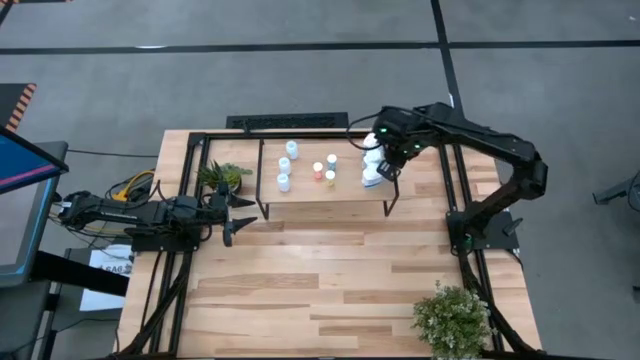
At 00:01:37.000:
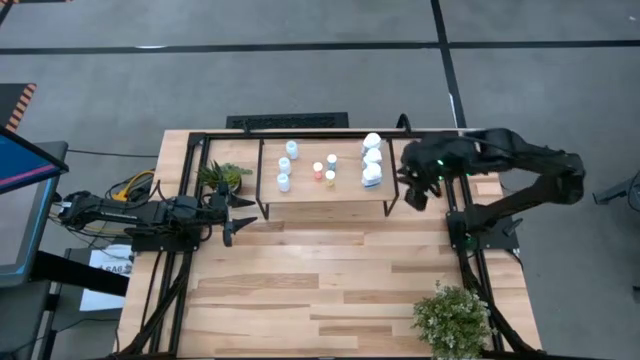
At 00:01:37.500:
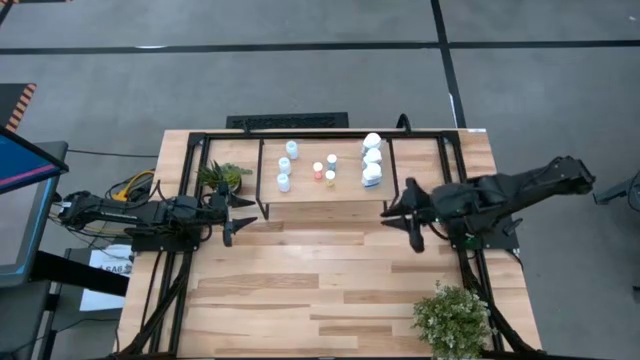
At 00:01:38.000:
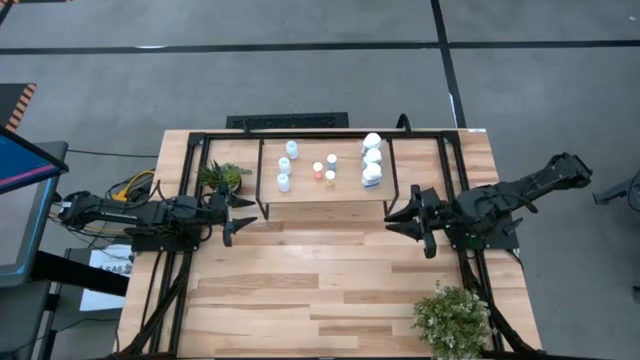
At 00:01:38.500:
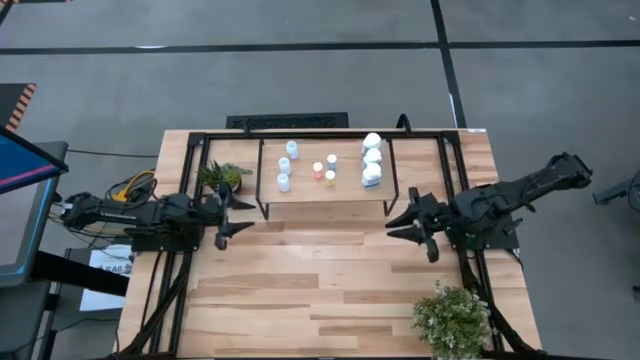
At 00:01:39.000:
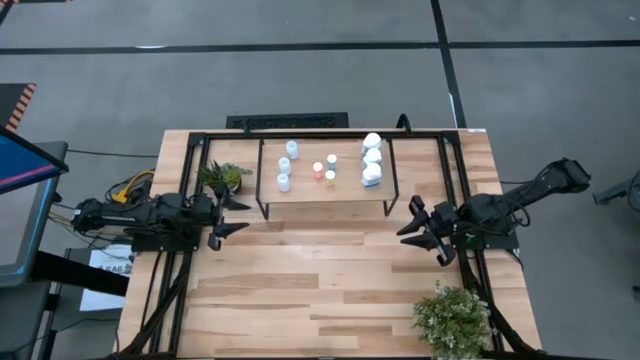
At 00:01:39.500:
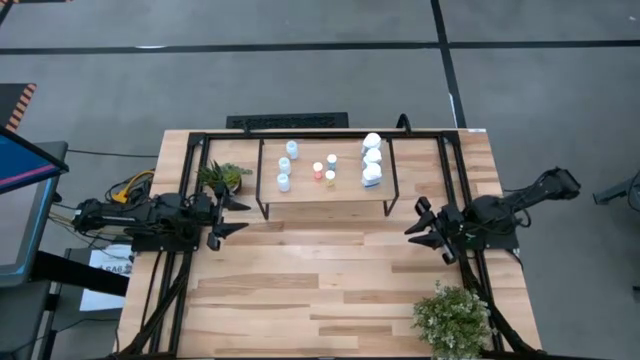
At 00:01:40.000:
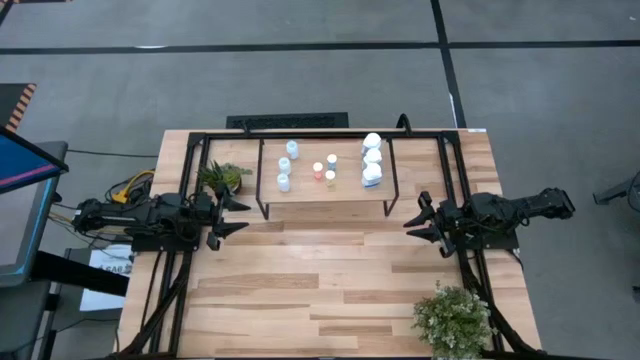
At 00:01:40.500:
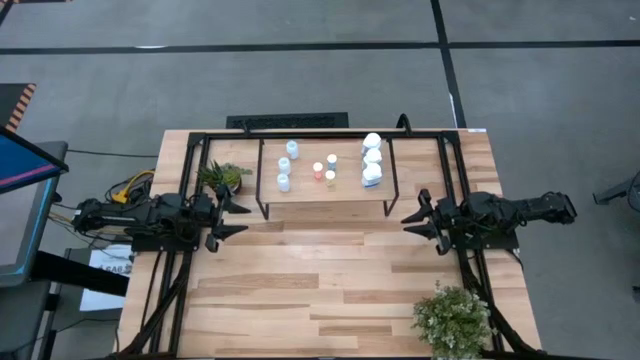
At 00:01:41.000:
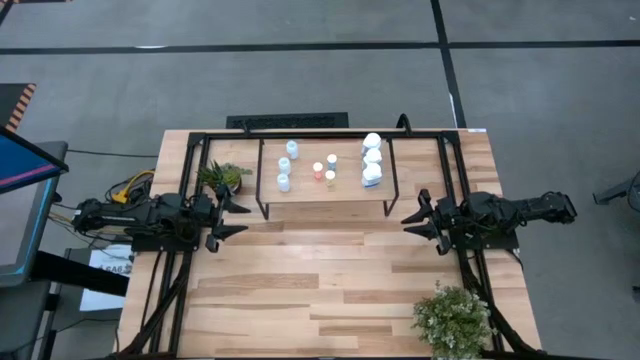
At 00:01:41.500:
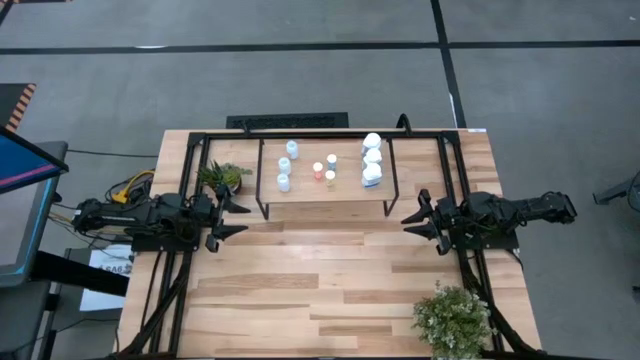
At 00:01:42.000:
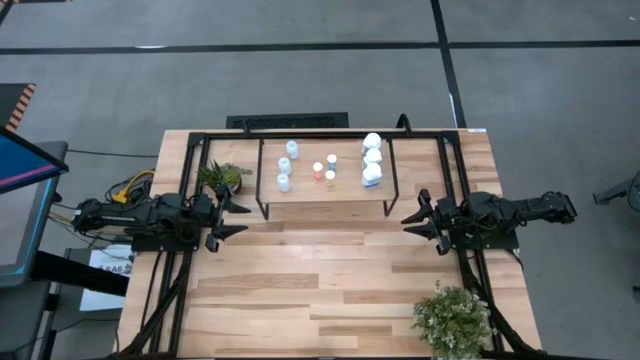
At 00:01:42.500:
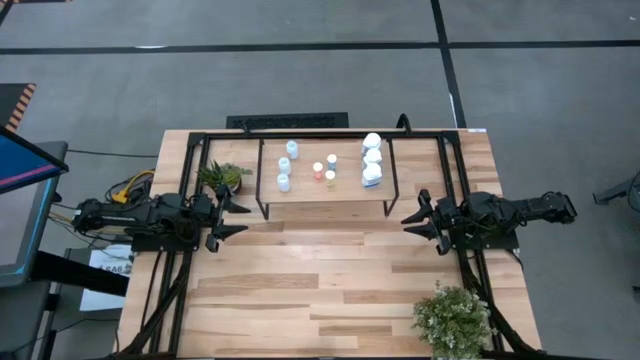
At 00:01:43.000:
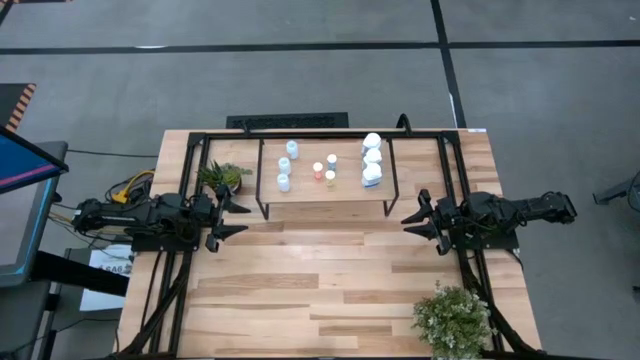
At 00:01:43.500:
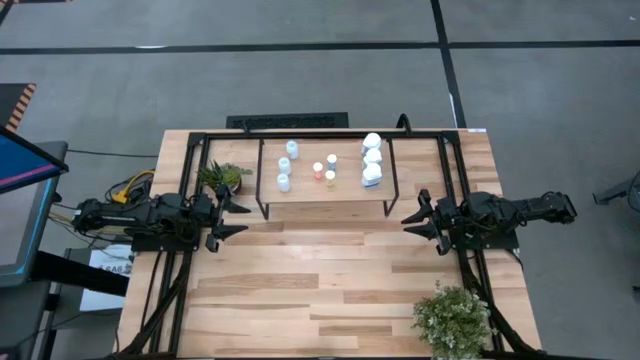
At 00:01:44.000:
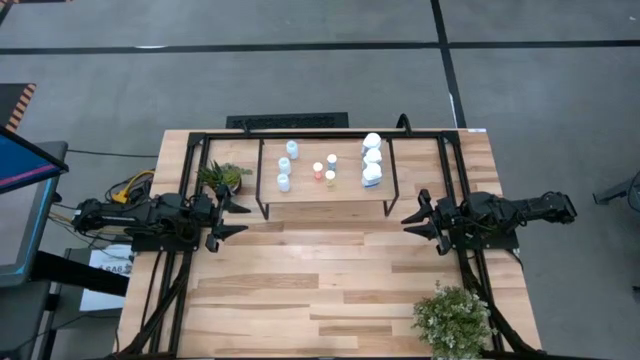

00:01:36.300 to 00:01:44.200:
Task: Pick and place medicine bottles onto shelf by color
Return to Home Position

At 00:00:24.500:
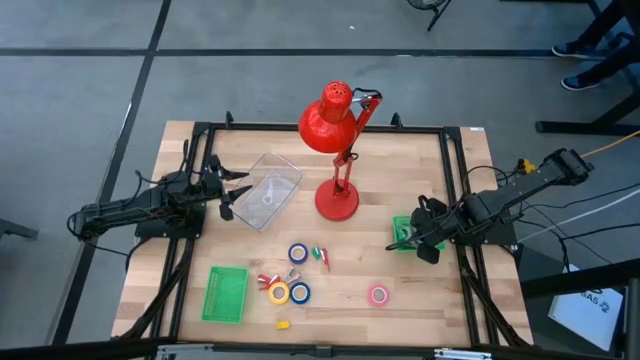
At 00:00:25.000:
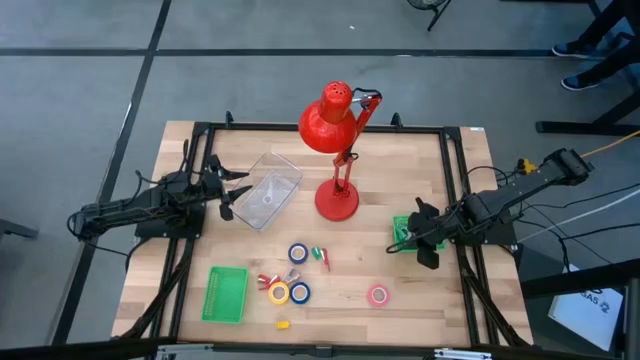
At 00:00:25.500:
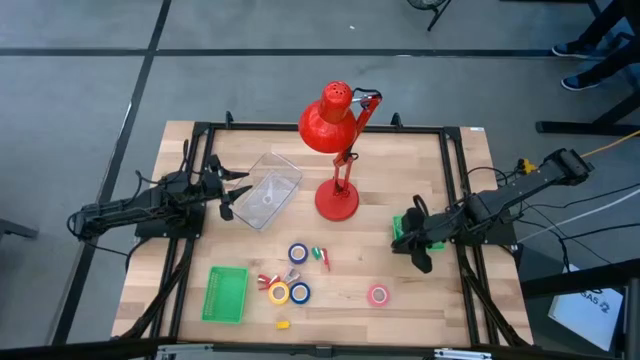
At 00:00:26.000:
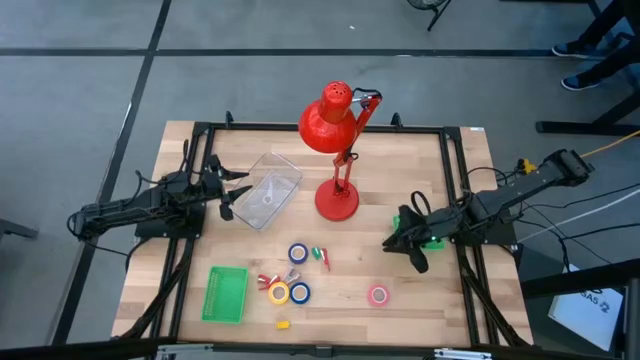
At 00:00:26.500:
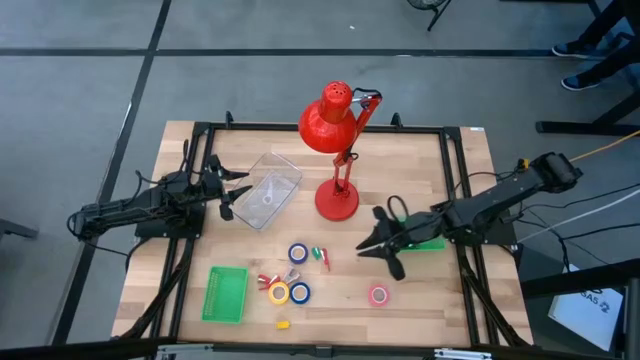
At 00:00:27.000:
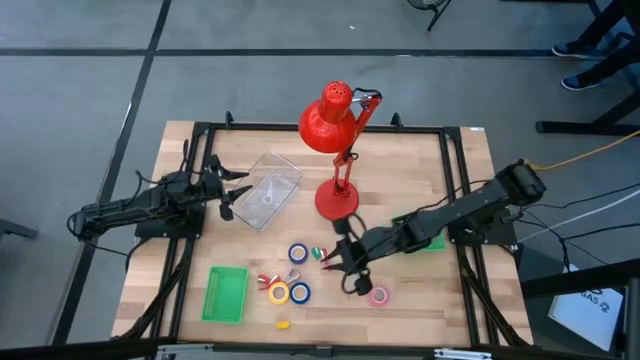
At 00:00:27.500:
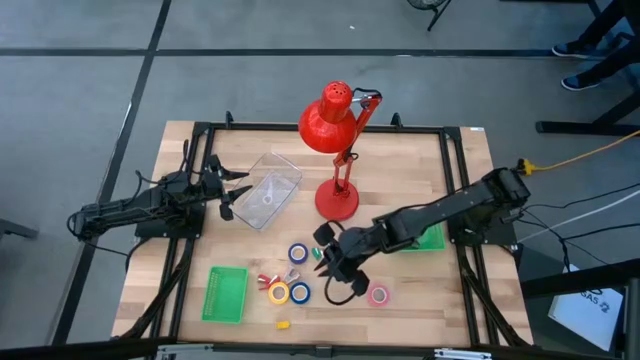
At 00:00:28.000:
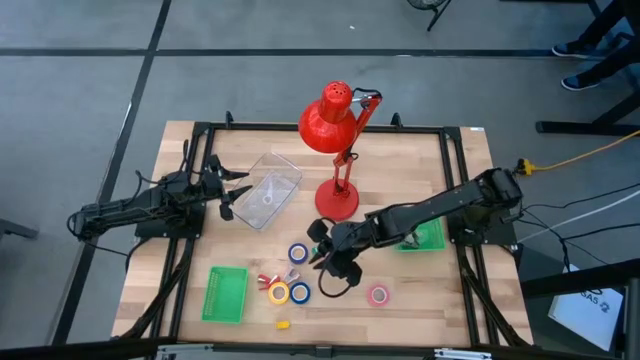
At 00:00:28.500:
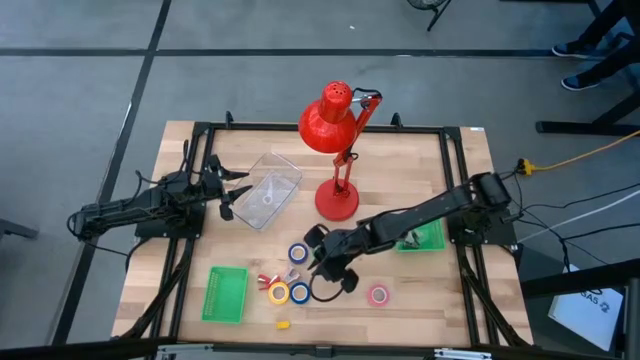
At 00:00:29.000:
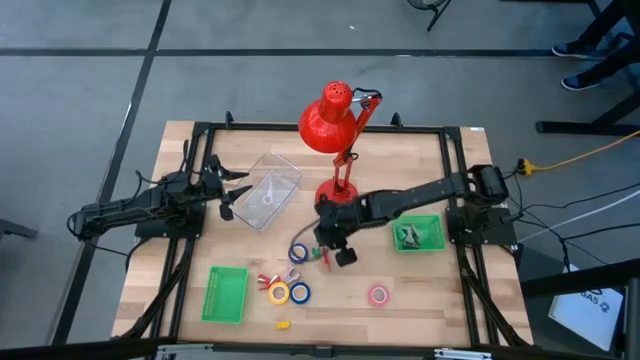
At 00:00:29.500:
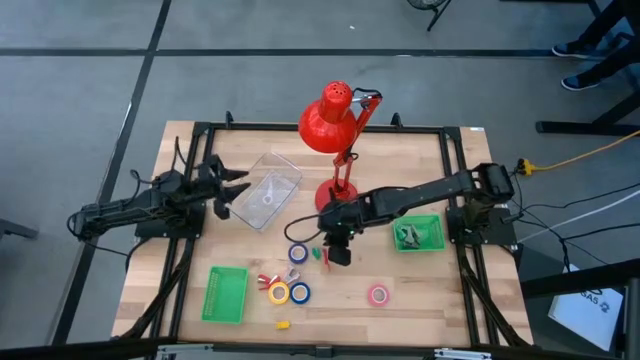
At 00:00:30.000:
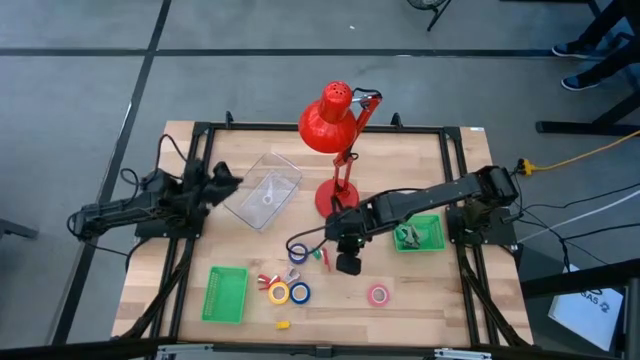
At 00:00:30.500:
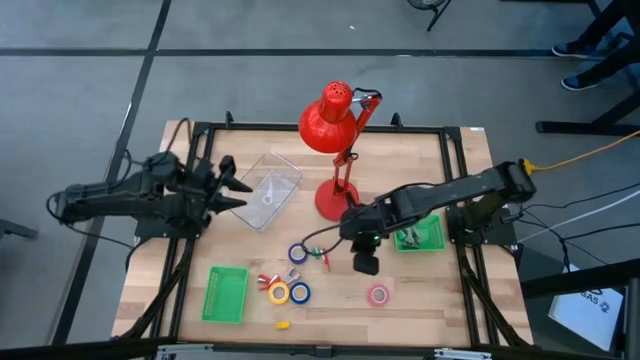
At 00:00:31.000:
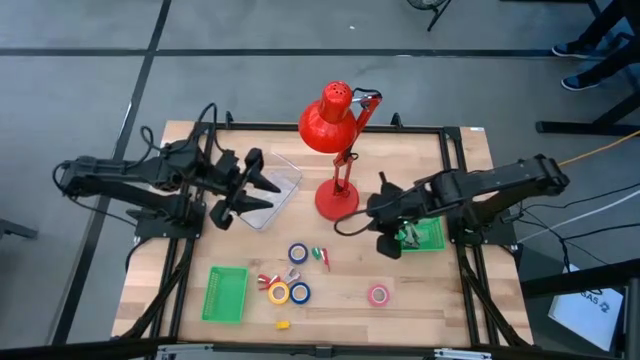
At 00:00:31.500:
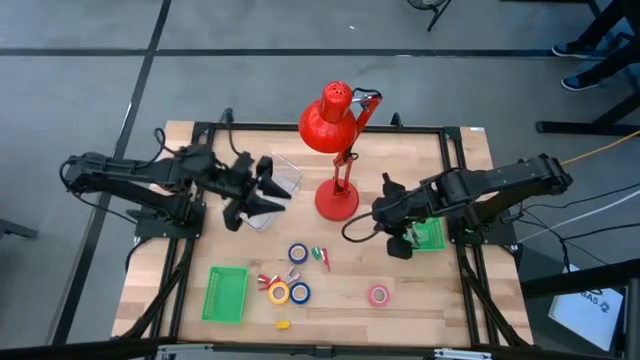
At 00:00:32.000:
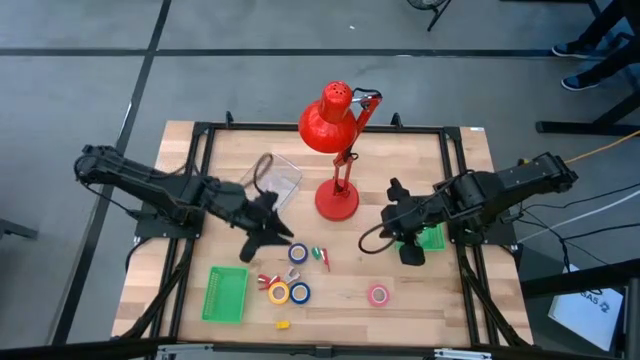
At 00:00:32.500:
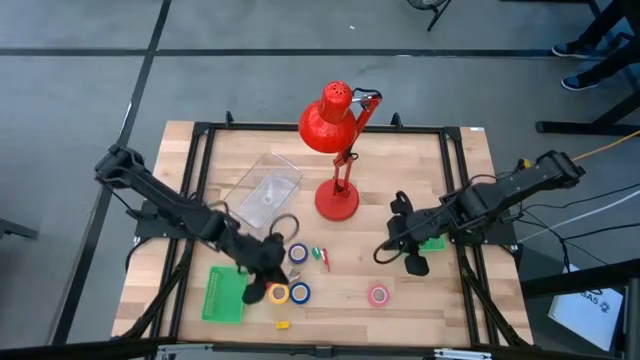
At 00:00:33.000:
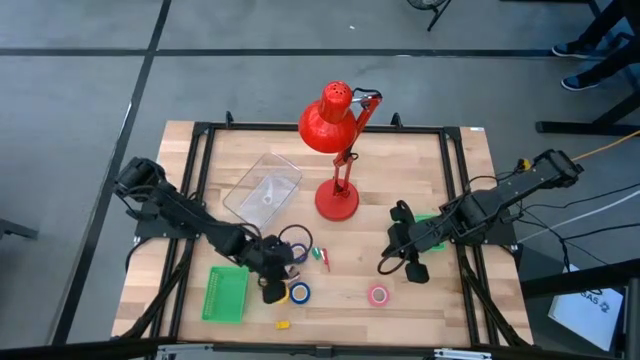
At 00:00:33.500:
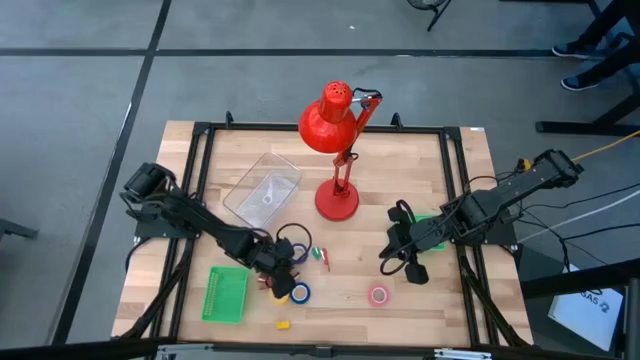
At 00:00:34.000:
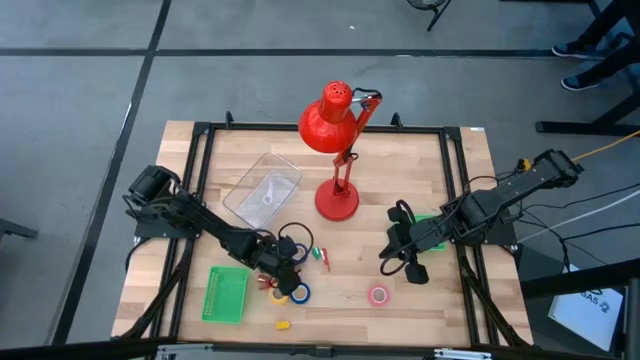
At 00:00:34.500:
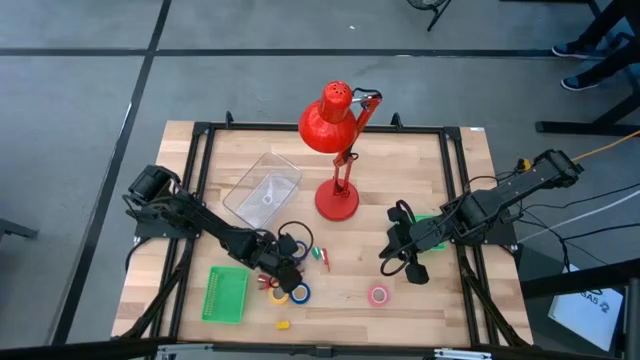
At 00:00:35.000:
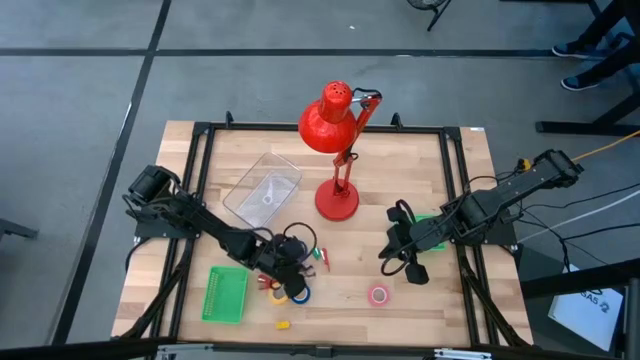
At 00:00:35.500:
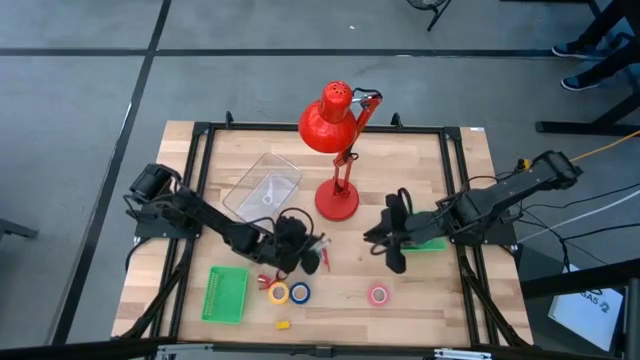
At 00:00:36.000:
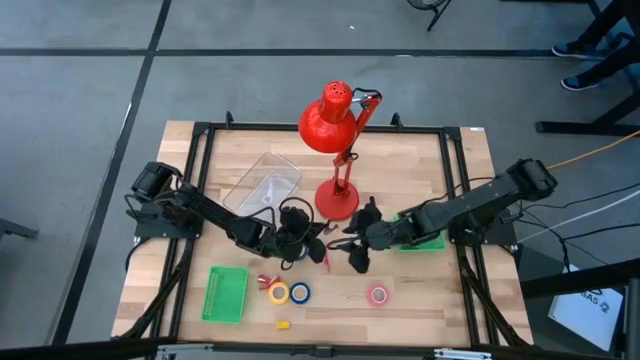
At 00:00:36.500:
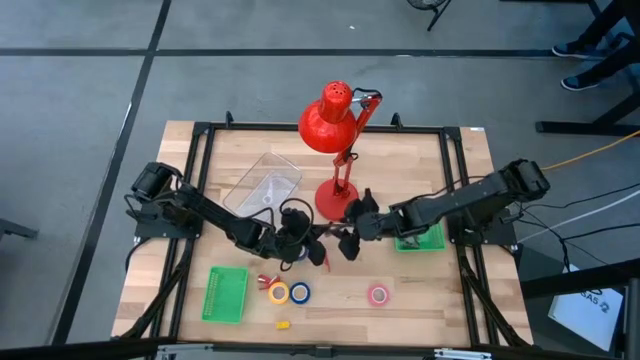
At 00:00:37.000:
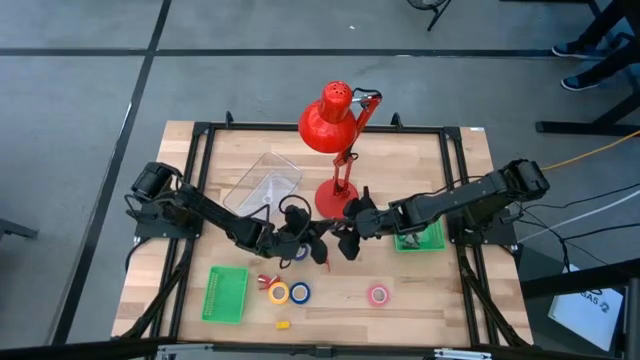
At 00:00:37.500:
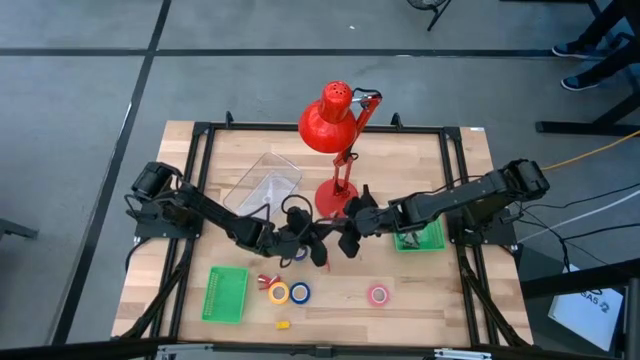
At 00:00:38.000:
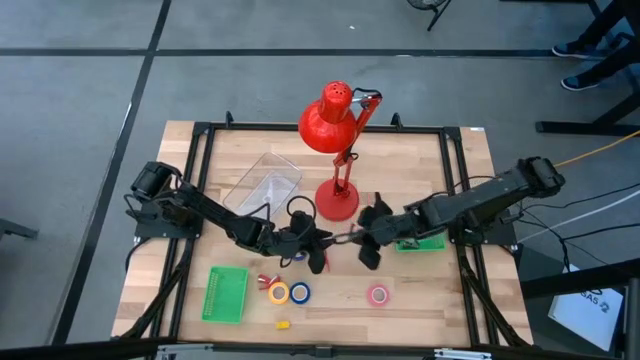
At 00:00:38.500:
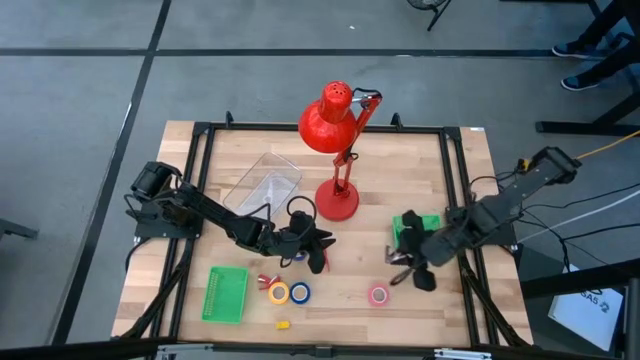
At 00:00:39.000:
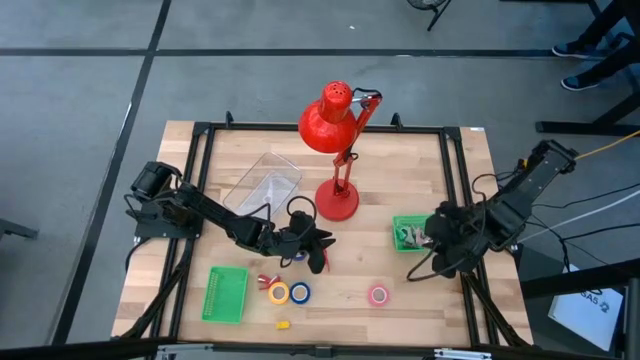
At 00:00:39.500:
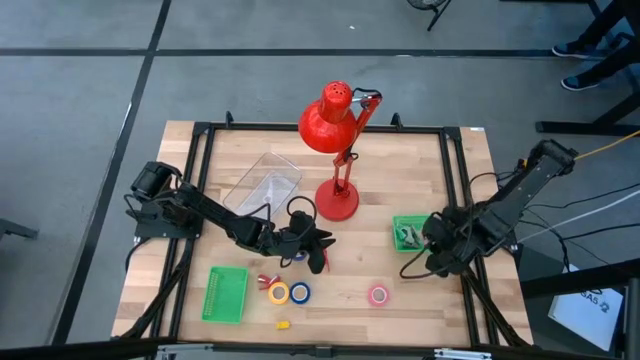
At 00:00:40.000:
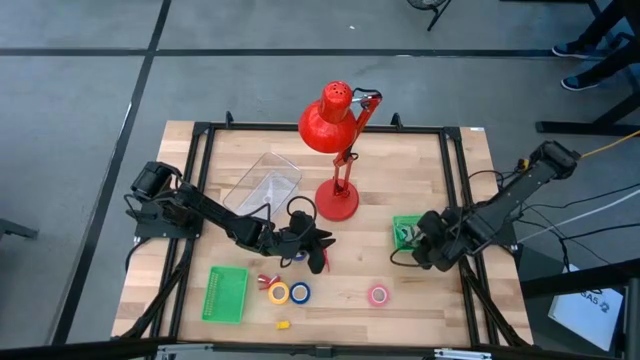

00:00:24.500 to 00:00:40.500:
Task: Pick and place Stapler, Stapler remover, tape
Put the pink staple remover into the top green basket
